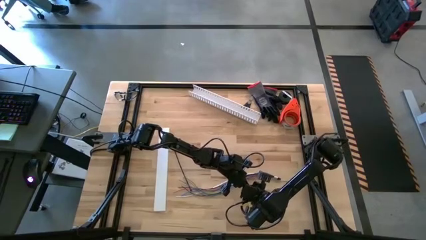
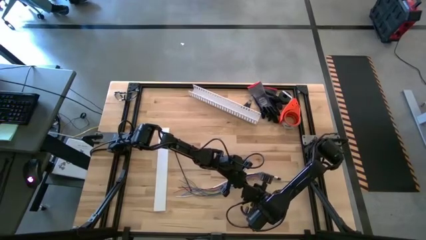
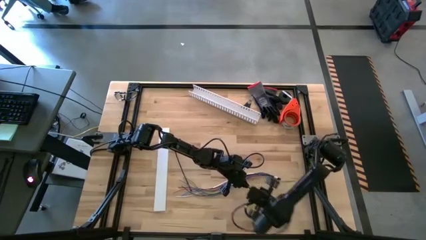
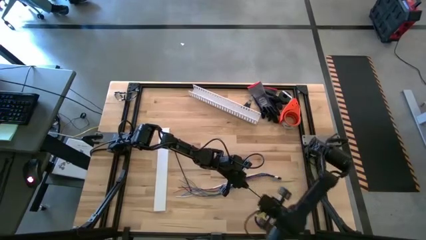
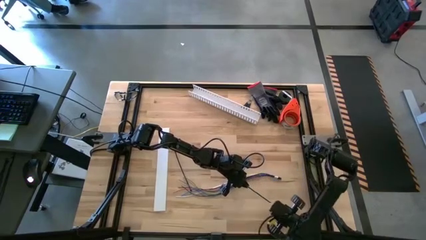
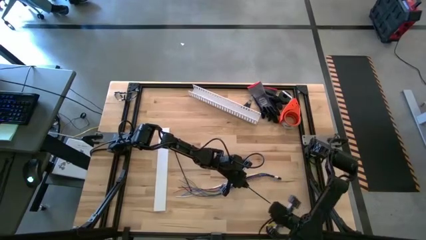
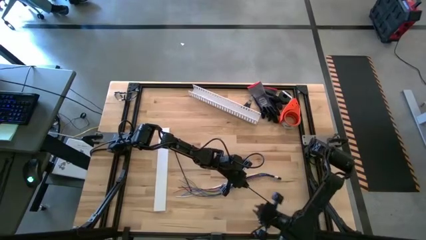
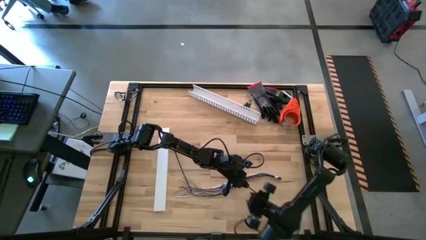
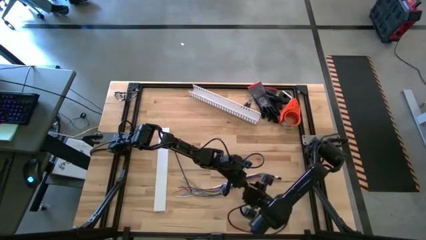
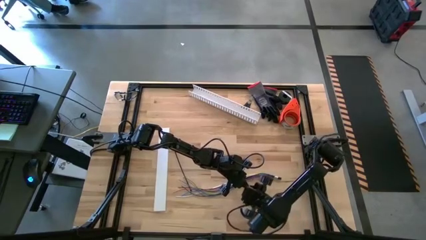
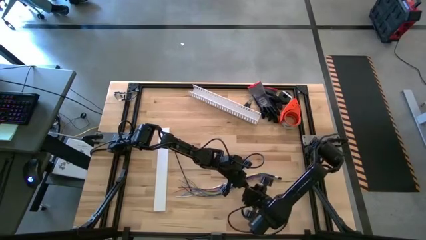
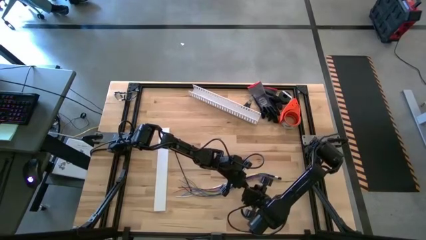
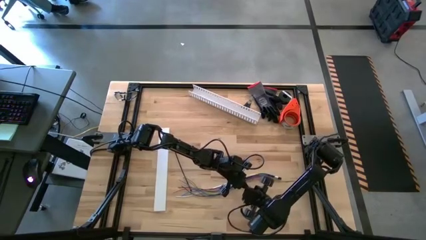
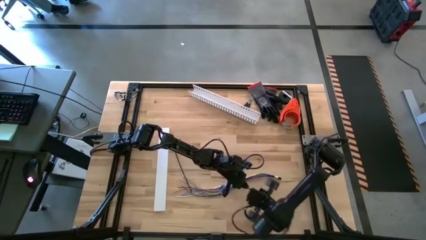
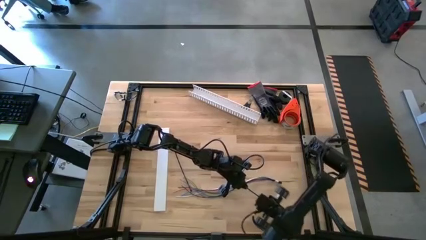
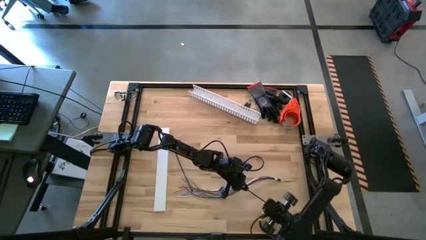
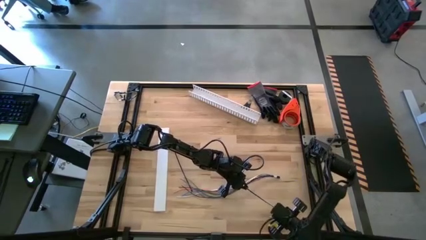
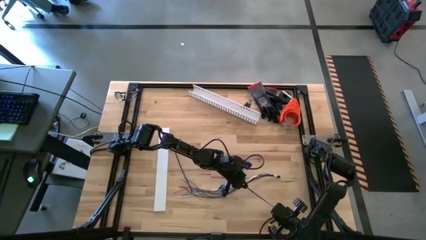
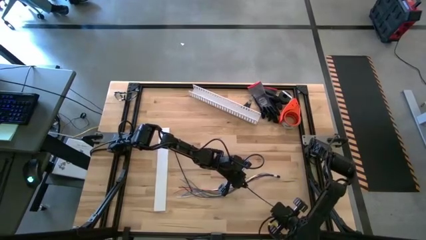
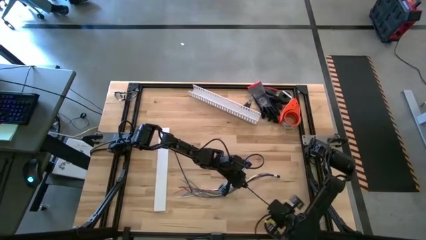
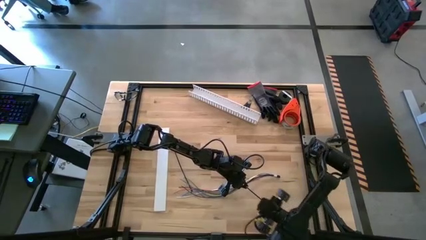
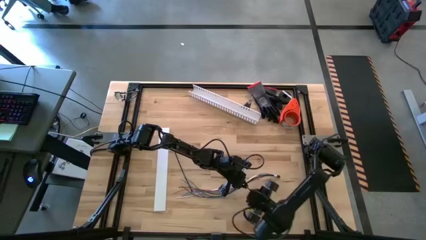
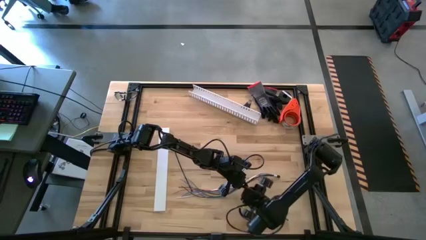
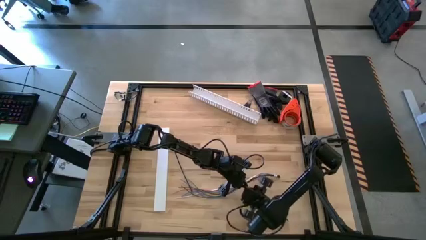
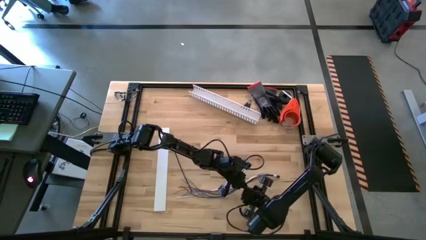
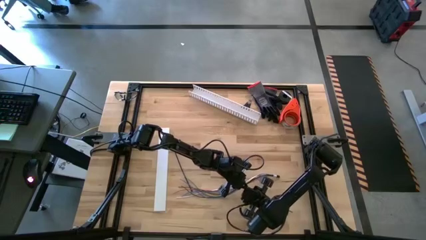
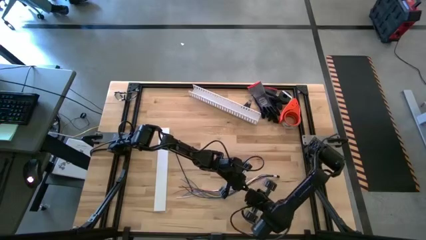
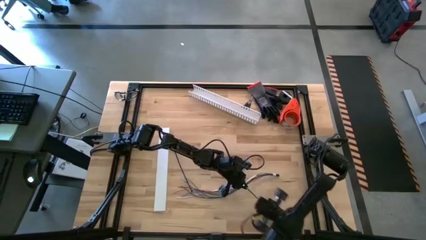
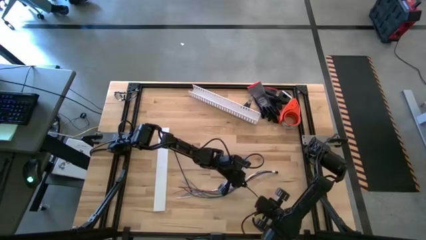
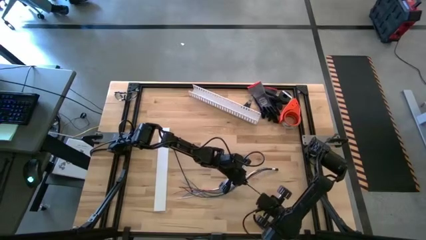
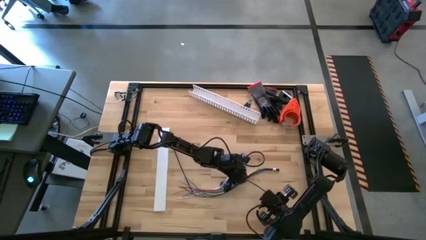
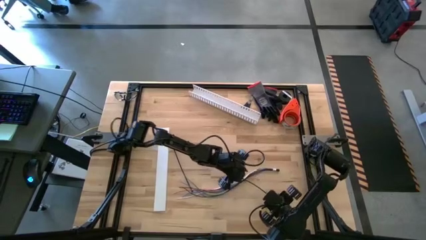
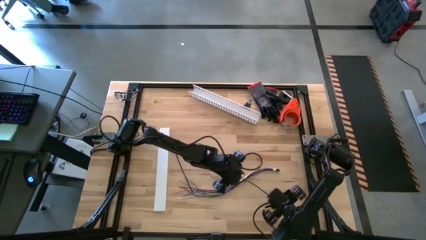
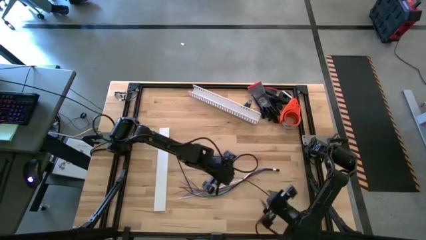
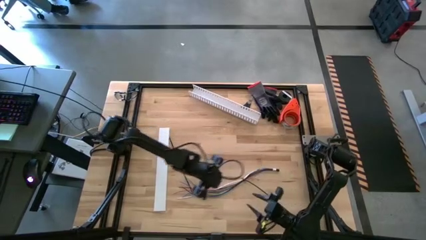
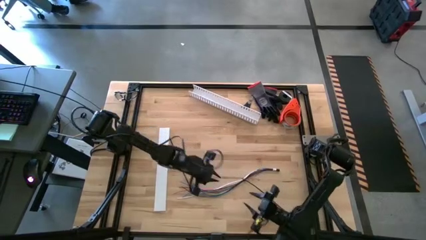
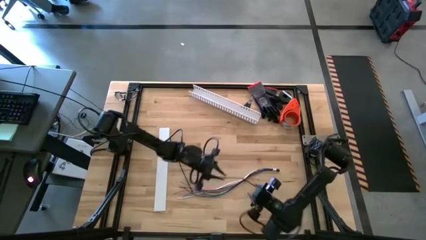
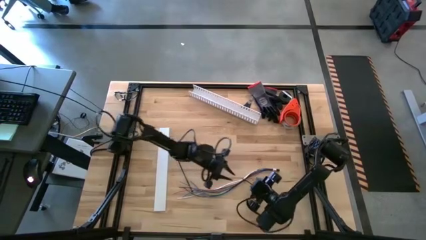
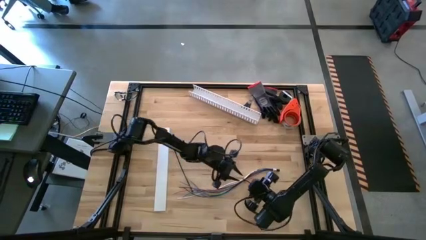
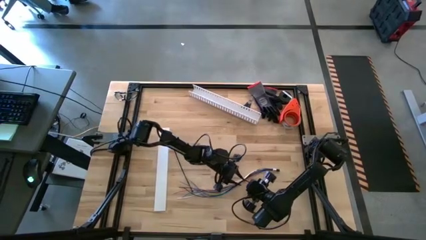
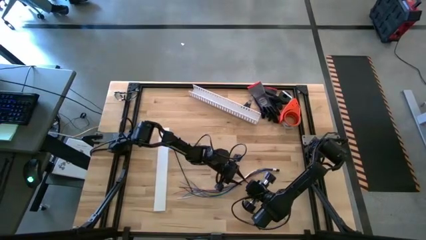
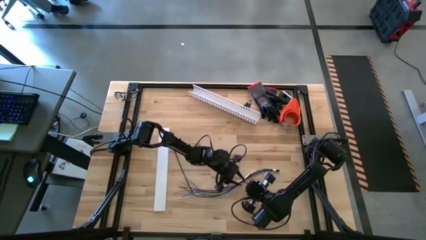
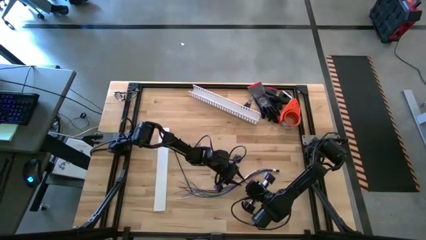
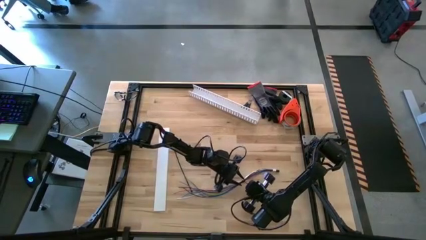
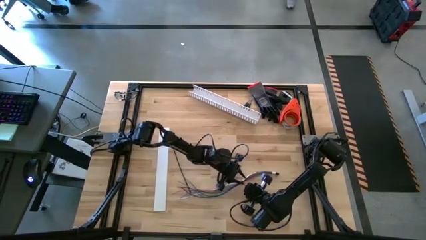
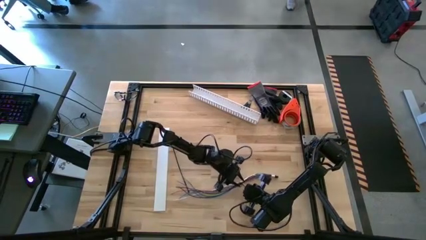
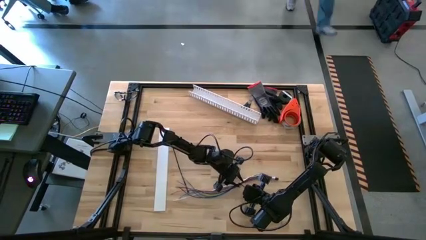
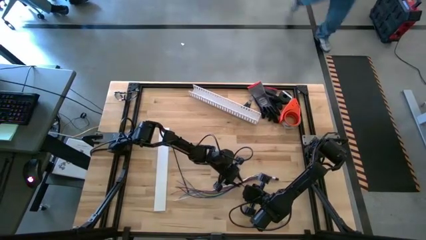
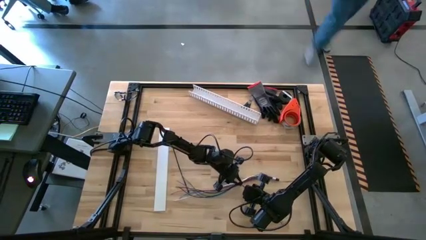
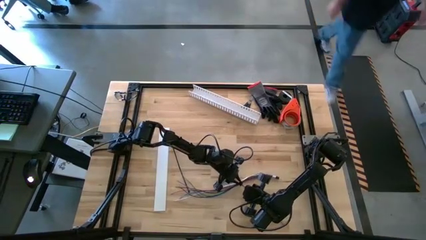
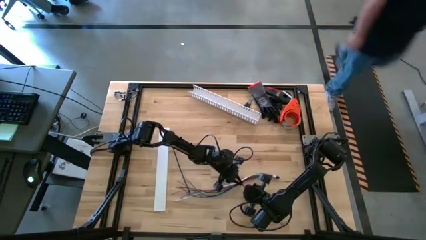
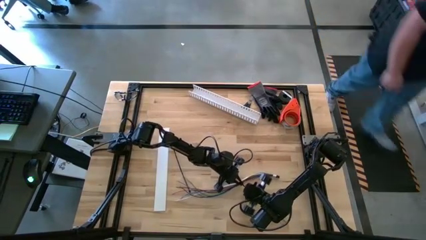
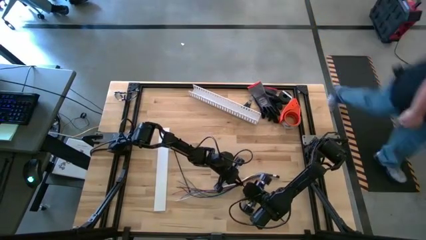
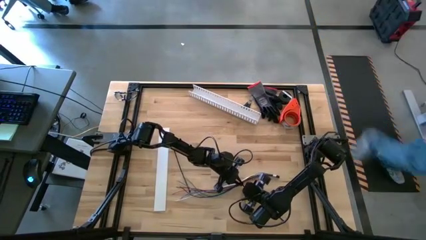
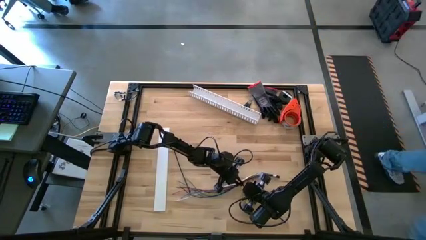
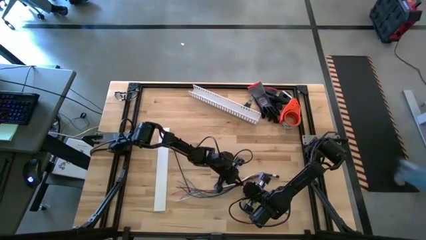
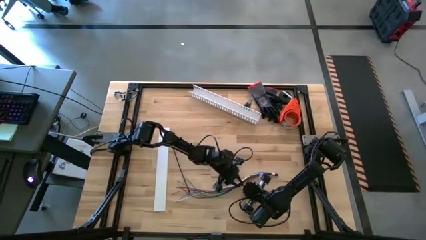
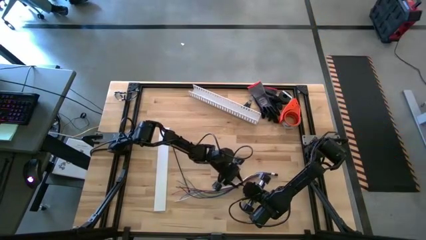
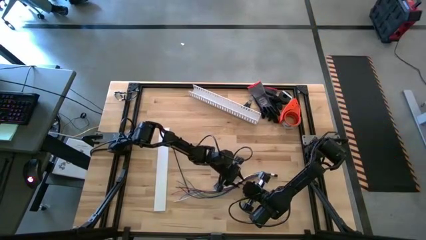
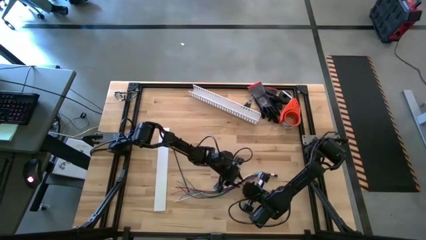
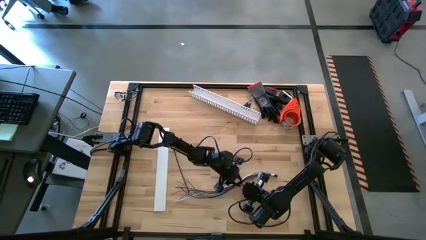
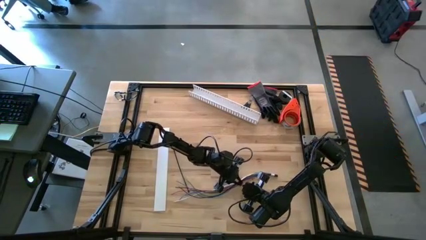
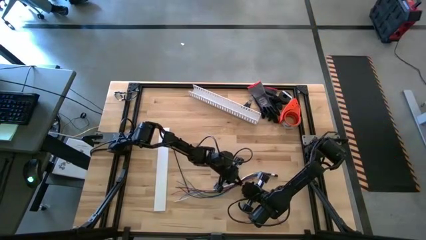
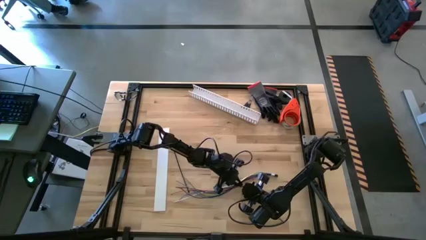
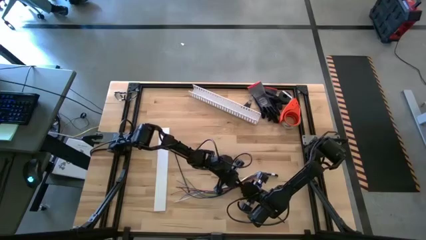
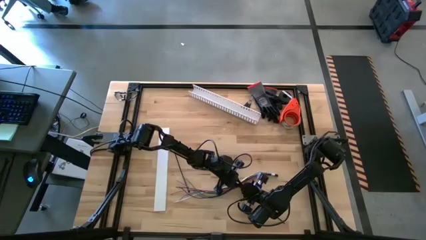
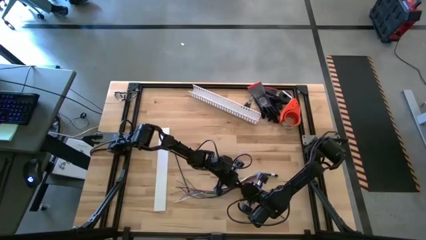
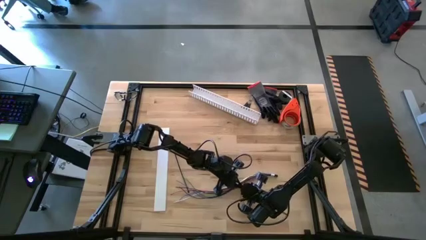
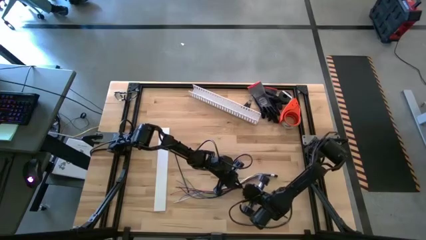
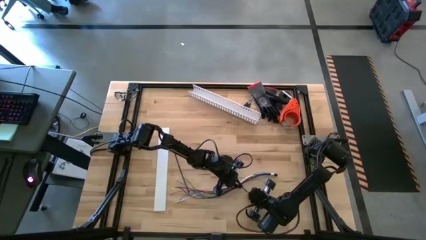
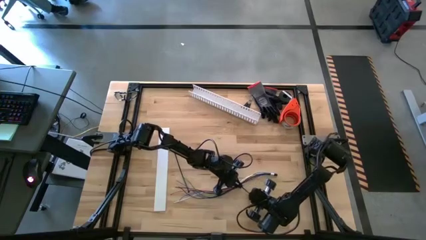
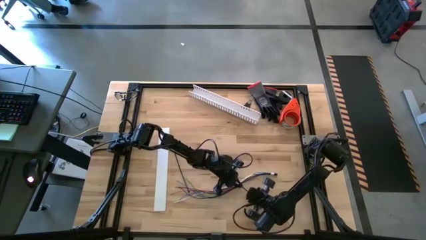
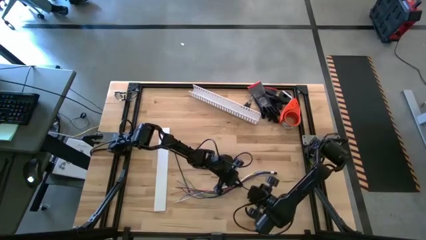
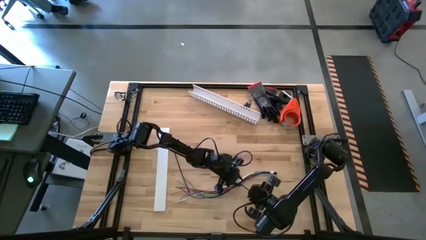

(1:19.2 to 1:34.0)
Task: Ziptie cables
Wrap the right zip tie on the cable

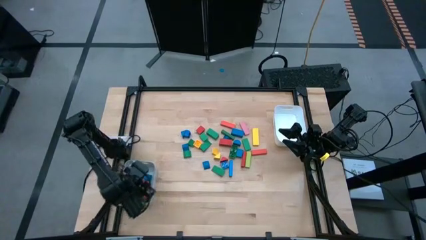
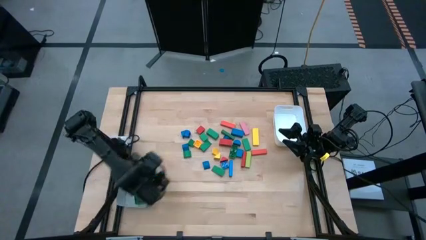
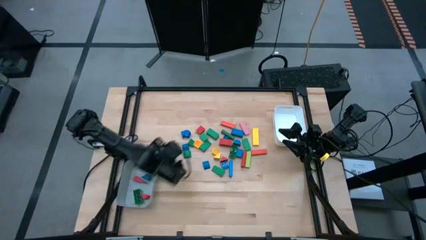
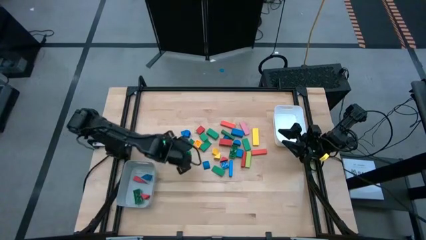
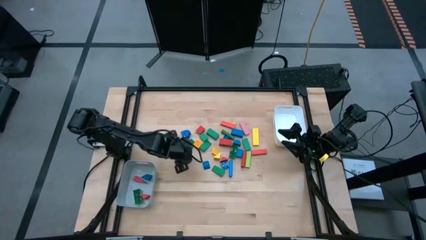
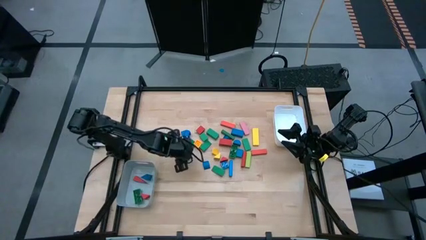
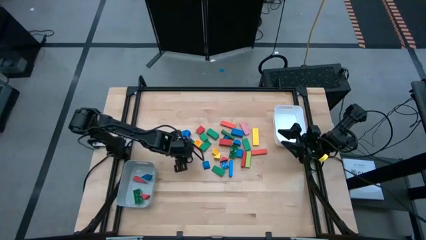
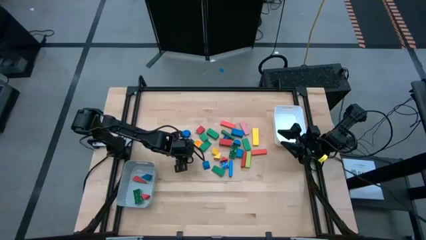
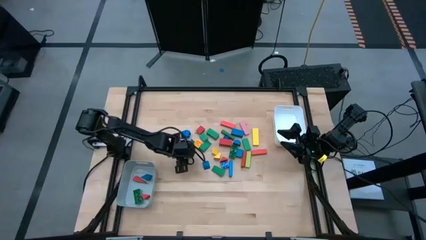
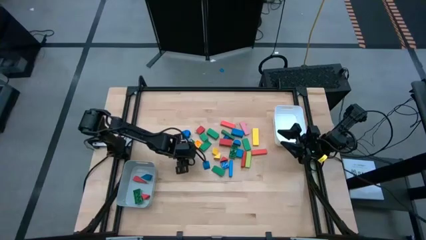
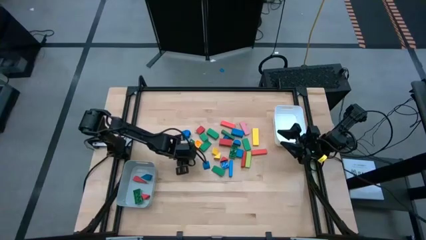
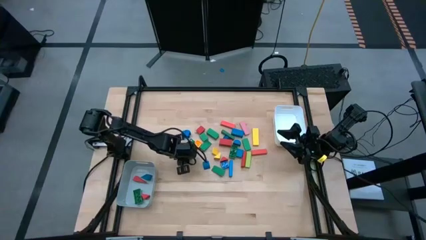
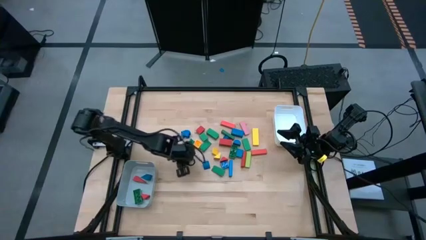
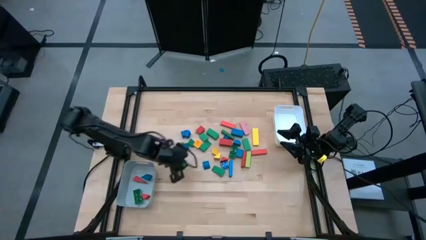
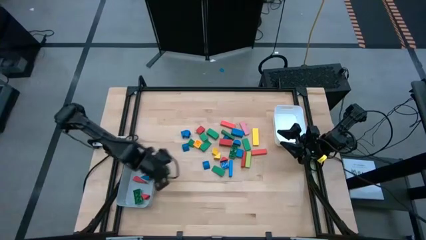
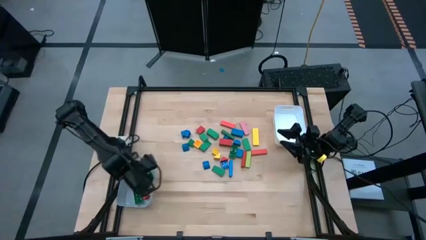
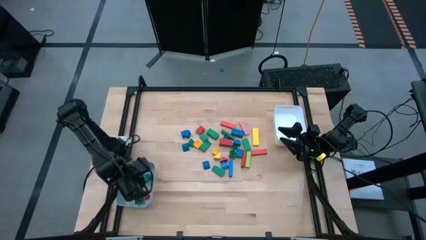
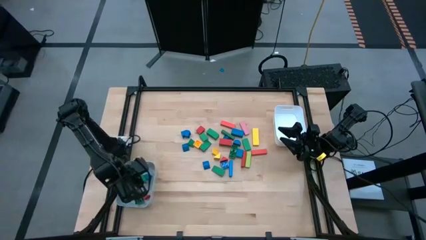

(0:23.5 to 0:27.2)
Task: Sort blocks by size
Put the green cylindrical block into the gray bin
